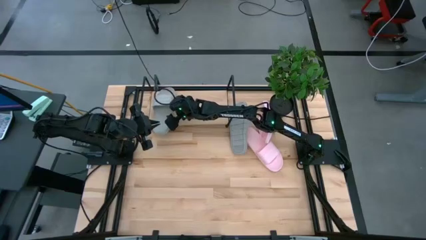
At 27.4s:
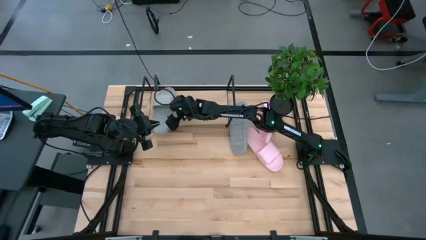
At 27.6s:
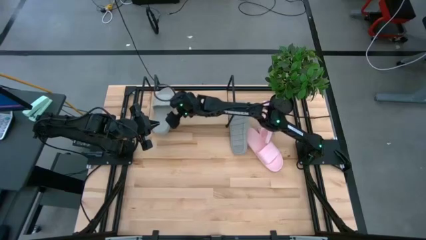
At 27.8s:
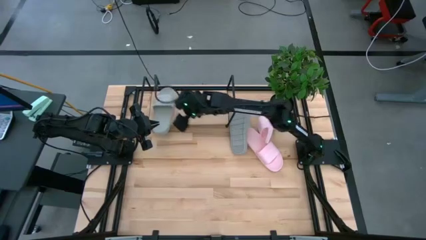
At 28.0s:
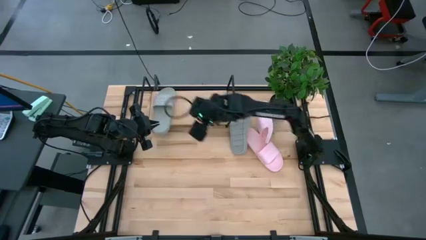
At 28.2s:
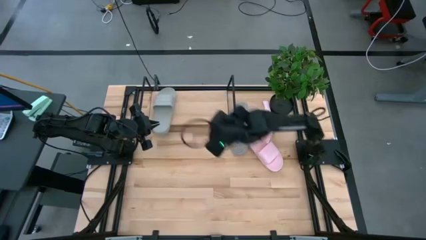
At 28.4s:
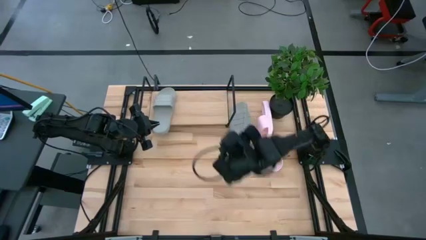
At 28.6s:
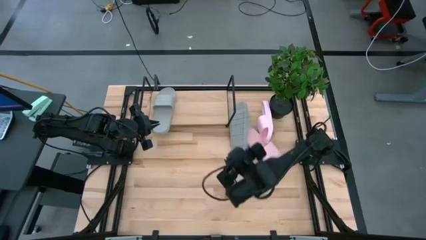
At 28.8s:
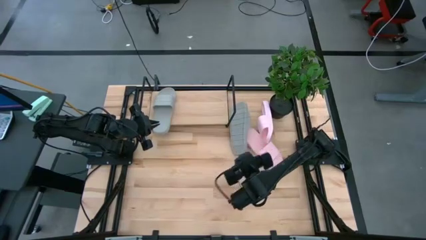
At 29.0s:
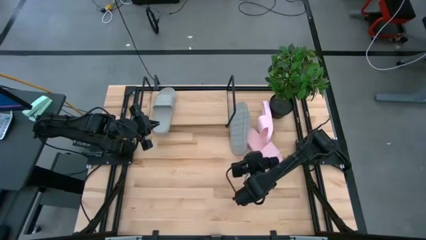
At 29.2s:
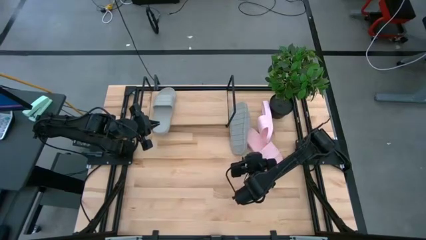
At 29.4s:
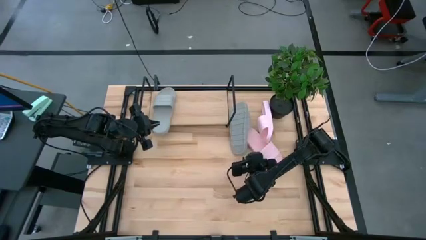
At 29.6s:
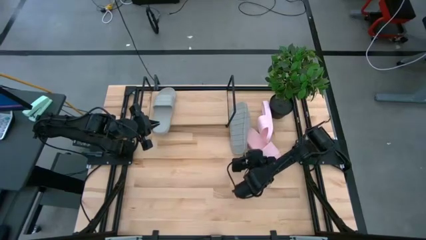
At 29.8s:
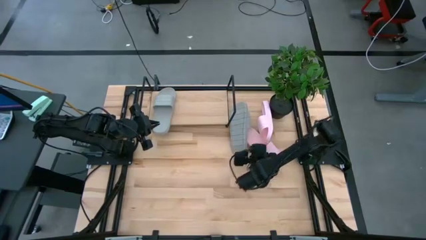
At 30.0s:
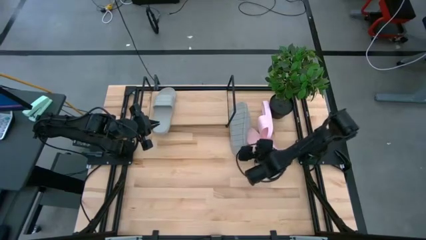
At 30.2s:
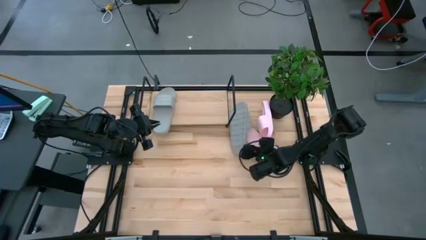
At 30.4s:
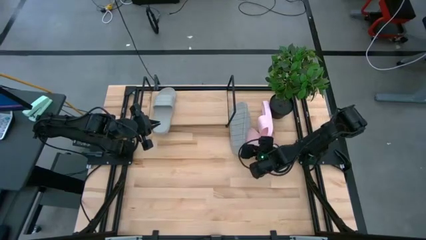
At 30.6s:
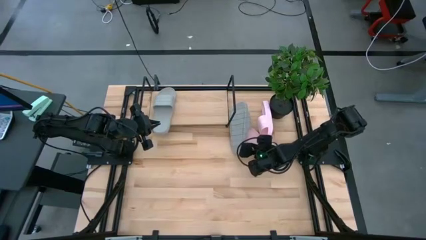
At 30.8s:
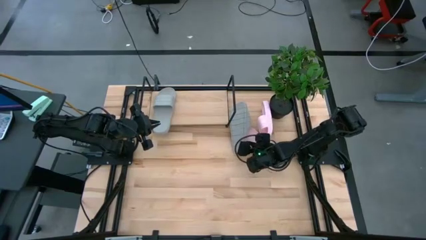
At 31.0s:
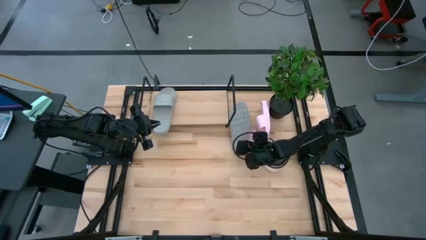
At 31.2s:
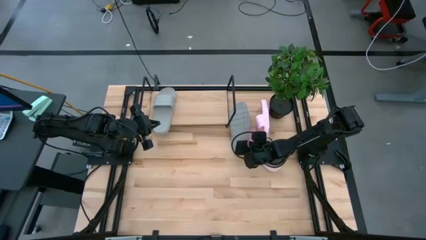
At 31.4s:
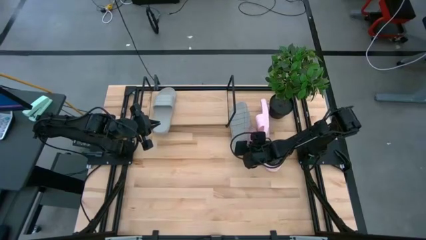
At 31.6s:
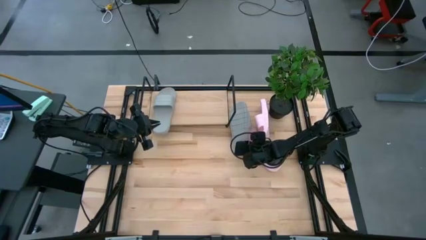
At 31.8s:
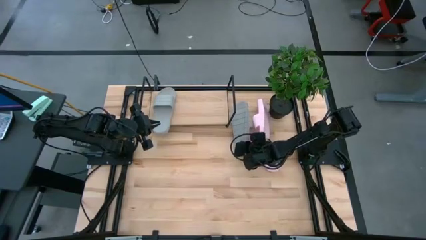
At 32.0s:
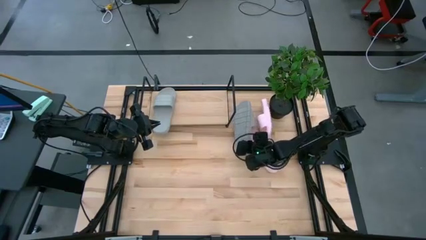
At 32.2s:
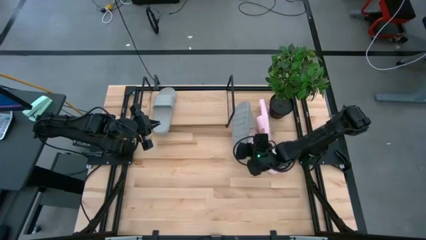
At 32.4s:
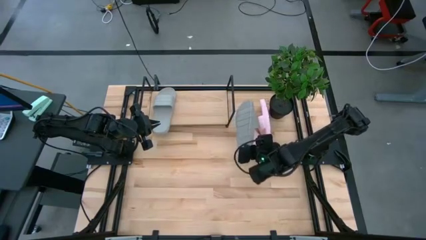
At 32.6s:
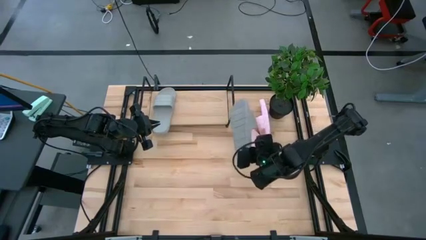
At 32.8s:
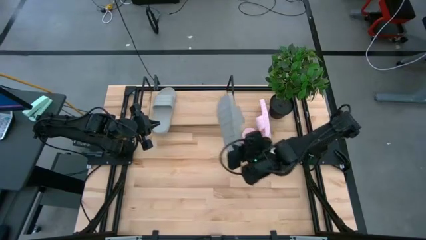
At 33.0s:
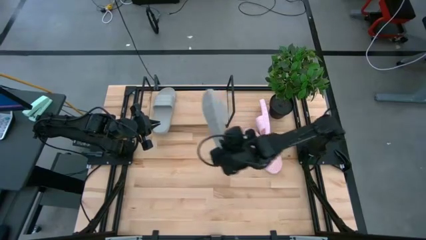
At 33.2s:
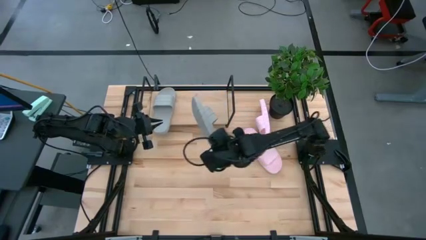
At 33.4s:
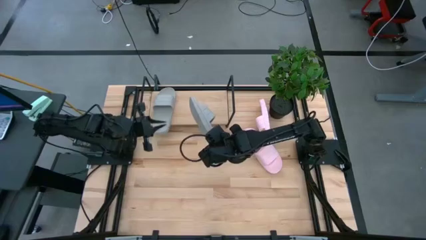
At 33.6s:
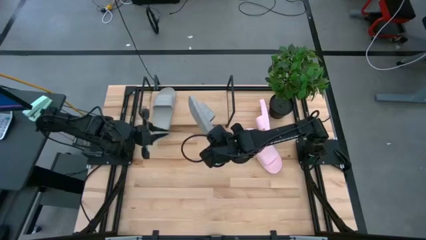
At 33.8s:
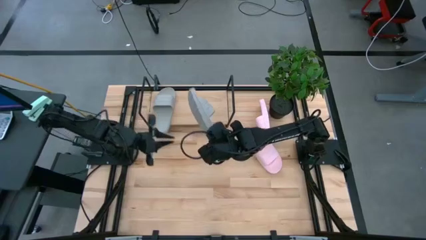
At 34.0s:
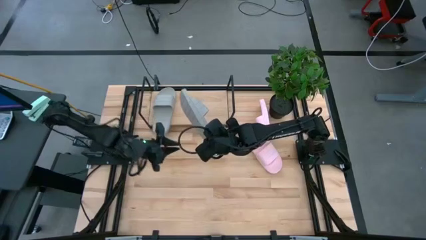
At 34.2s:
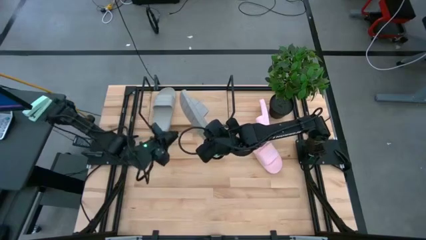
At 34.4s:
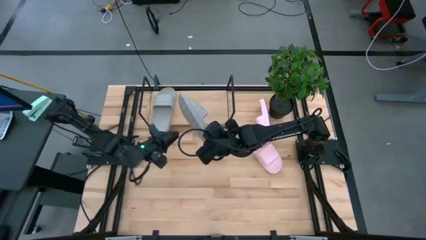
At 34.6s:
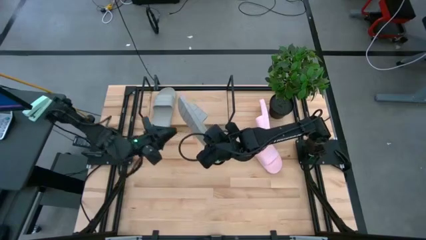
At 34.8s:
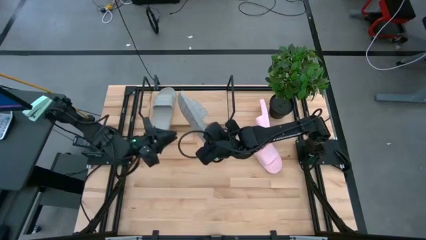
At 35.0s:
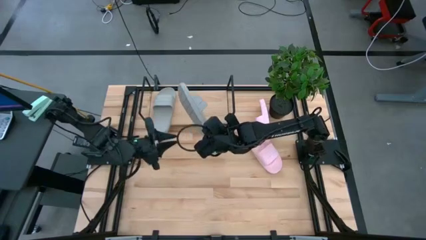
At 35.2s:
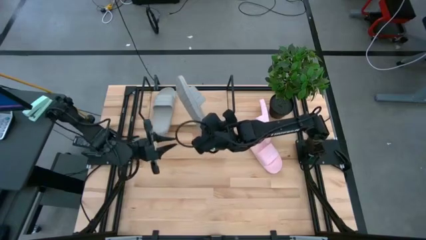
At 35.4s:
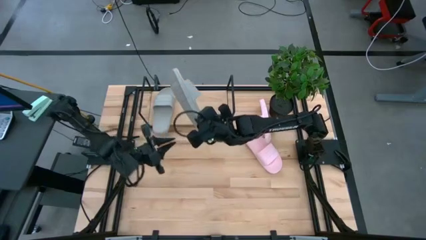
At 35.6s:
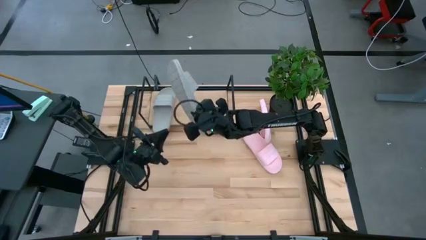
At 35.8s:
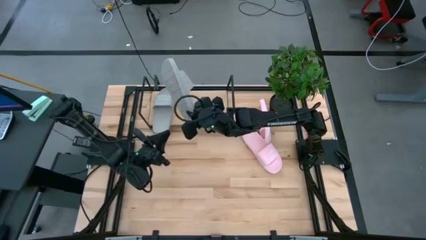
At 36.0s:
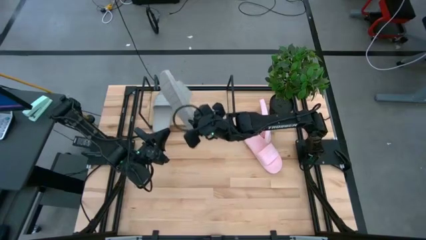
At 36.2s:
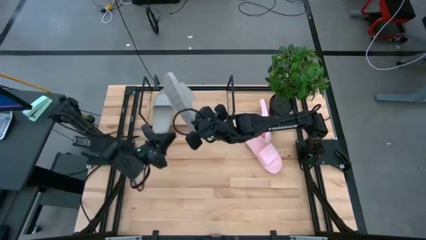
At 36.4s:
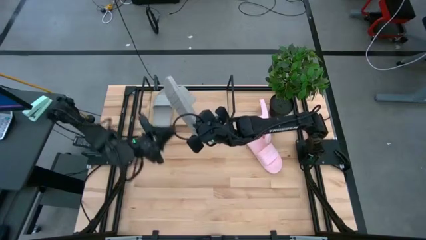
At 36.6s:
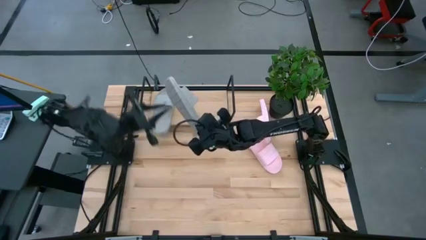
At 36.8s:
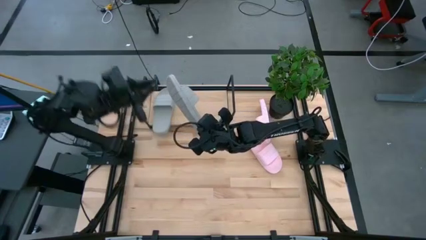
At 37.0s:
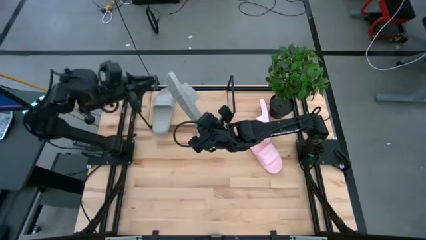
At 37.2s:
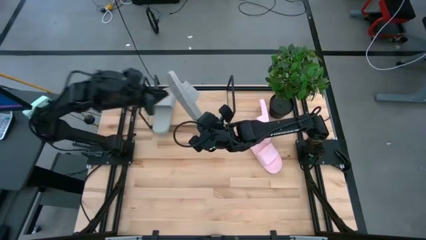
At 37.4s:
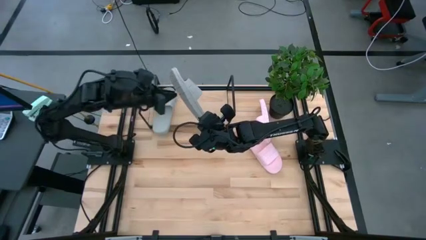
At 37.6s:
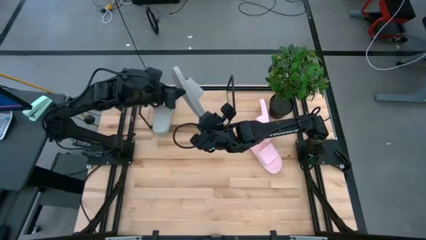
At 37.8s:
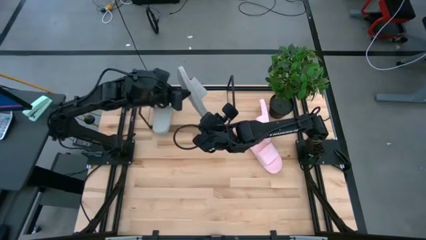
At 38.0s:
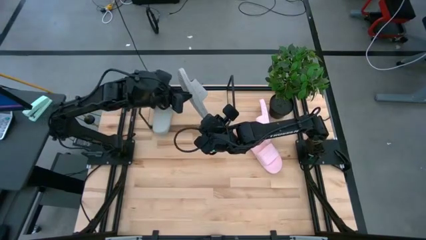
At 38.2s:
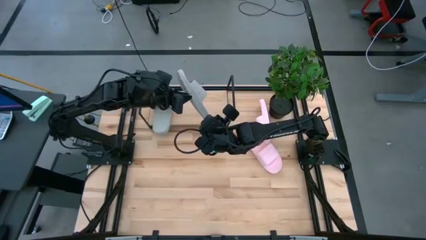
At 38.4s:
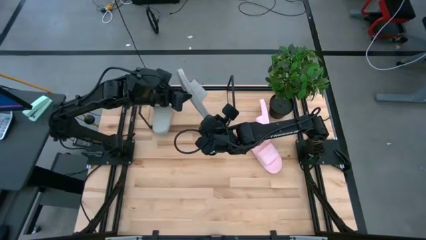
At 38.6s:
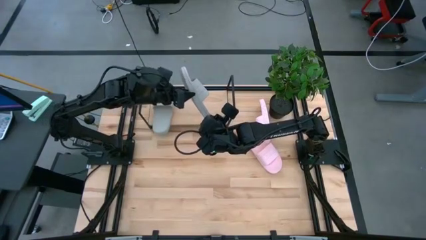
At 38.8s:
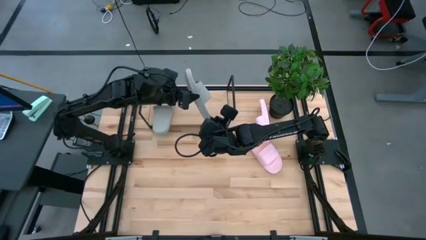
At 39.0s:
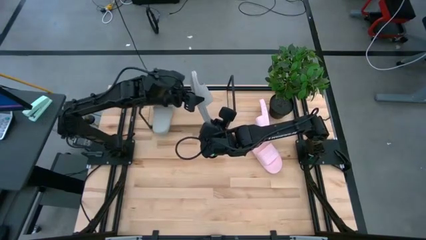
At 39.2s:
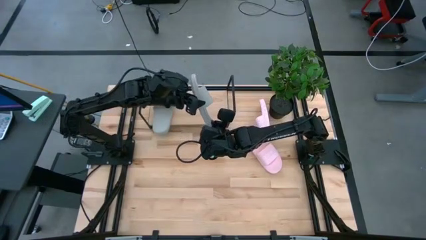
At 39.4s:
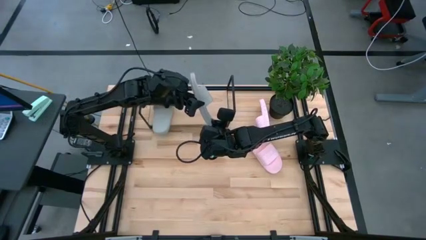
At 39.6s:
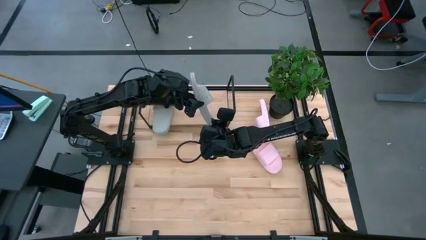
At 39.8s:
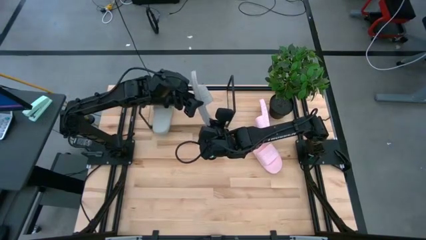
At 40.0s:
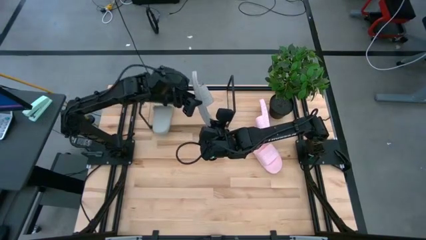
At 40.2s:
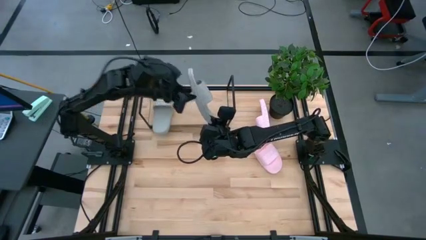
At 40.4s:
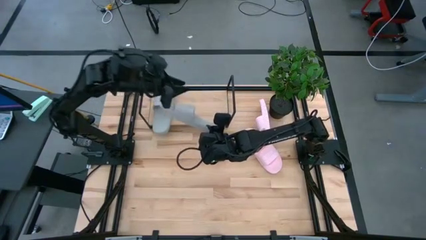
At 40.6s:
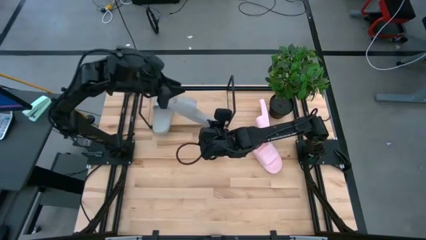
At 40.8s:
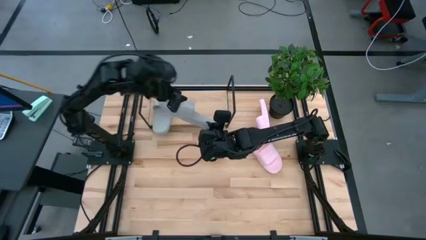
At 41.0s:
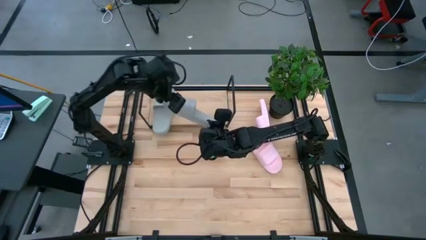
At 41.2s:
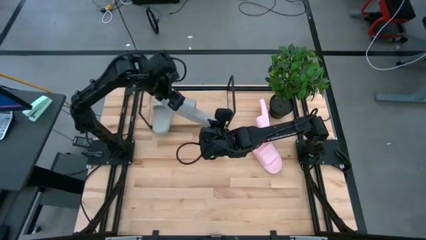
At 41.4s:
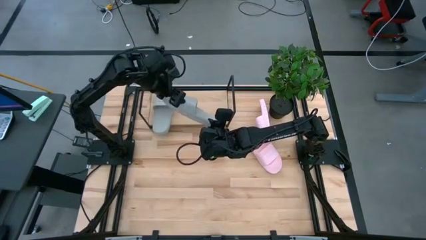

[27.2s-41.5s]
Task: Pick and place slides into the shelf
Put the gray slipper on the shelf

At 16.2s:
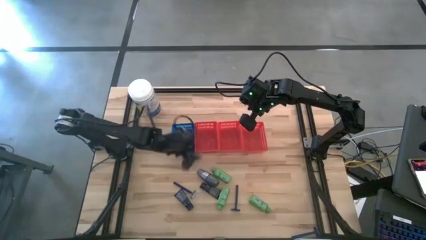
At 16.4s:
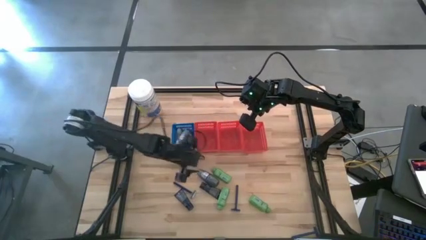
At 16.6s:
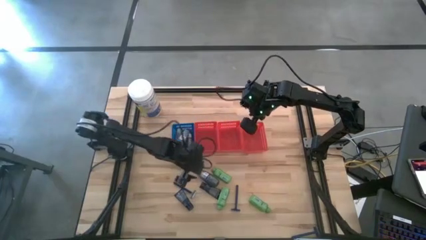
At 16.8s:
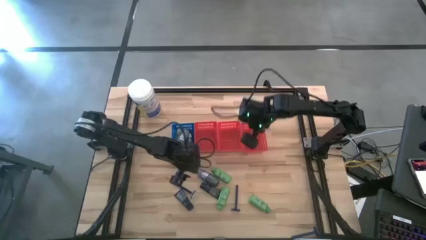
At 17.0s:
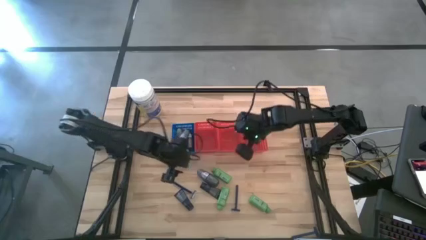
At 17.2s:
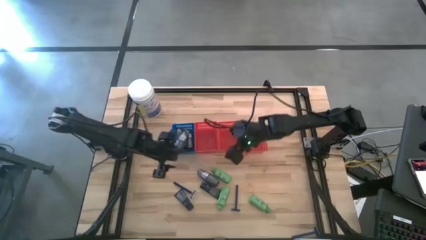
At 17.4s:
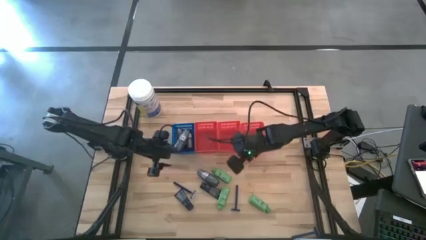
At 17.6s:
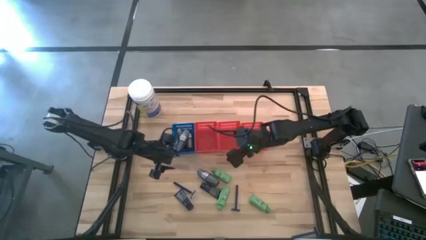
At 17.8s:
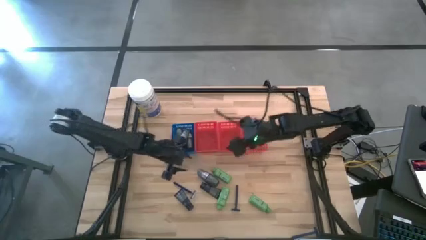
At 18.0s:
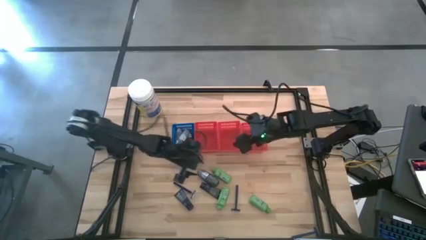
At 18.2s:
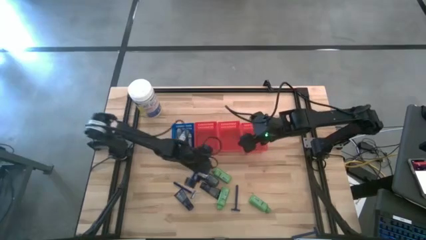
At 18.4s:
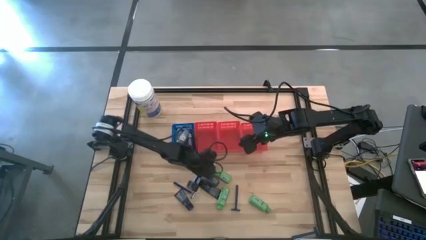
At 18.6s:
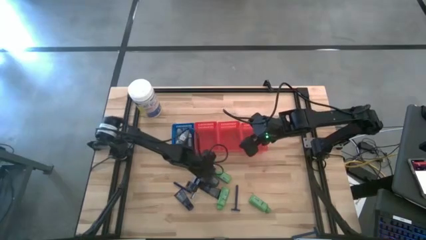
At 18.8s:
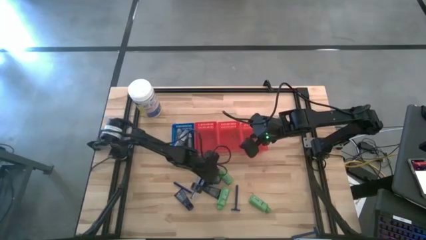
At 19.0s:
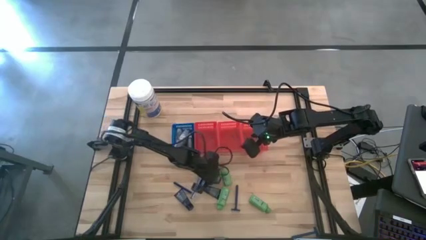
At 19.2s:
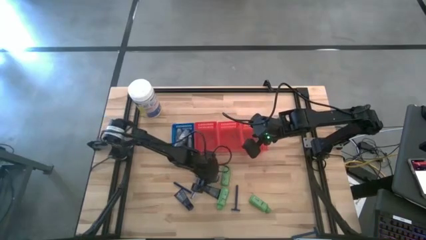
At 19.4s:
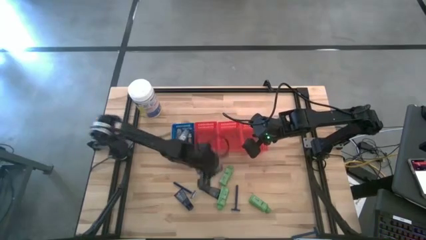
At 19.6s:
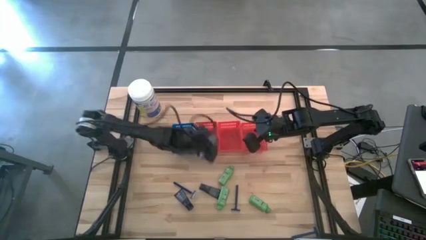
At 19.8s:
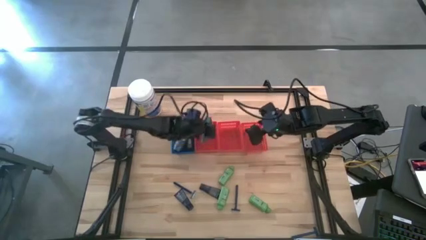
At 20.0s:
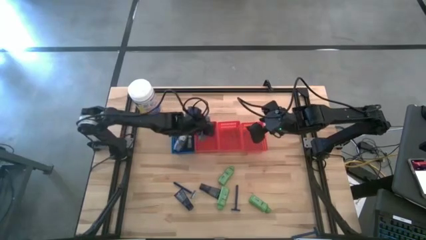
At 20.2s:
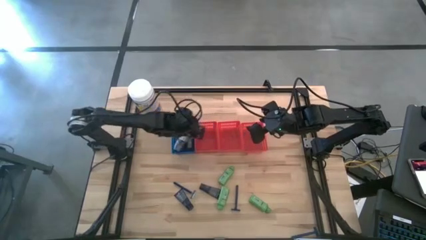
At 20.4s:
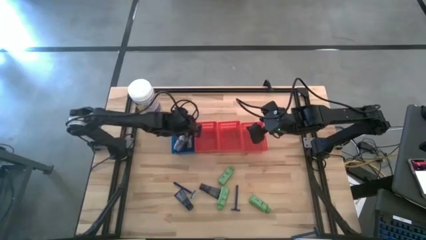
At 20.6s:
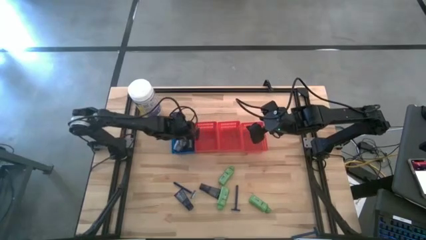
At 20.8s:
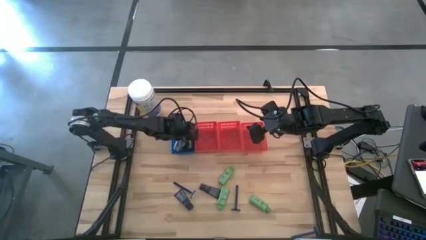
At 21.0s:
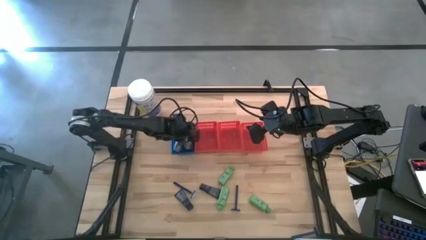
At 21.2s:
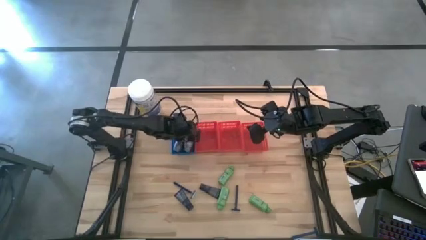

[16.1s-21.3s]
Task: Pick & Place Travel size toiletries
Put the deodorant into the blue bin
